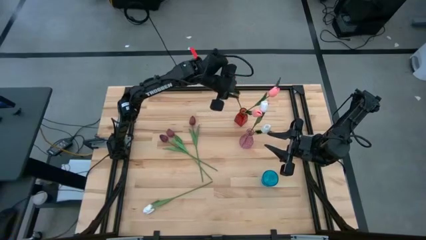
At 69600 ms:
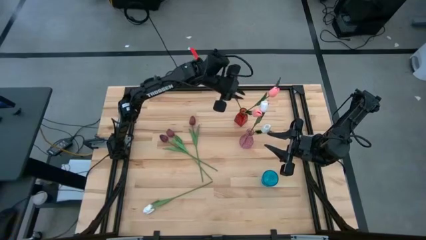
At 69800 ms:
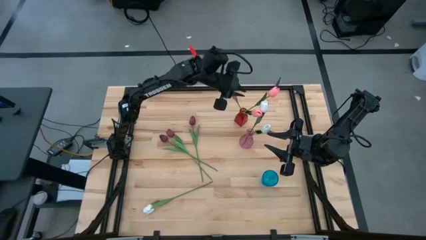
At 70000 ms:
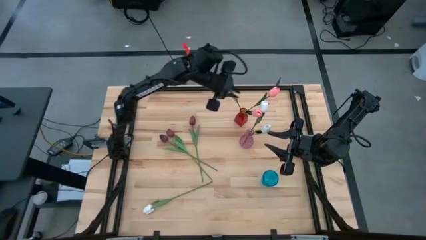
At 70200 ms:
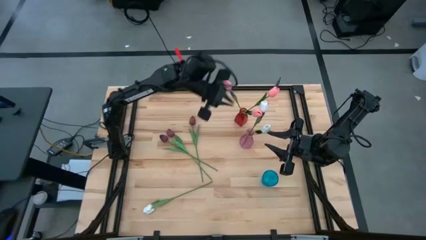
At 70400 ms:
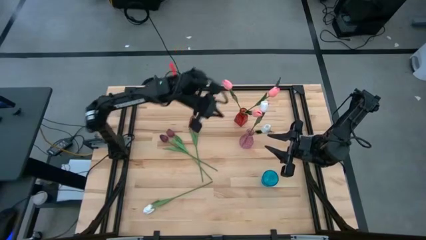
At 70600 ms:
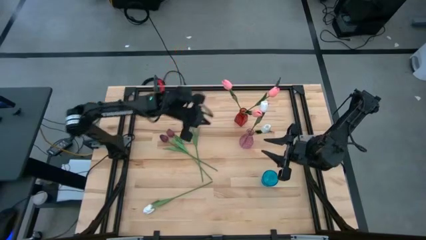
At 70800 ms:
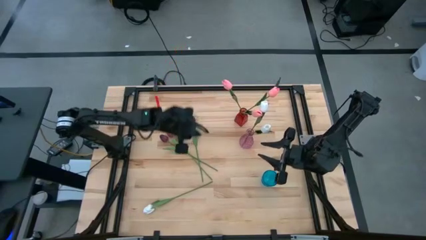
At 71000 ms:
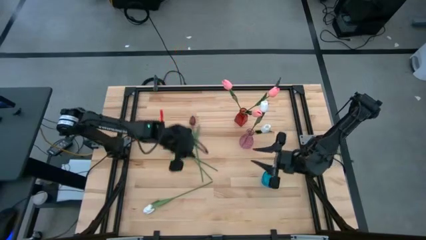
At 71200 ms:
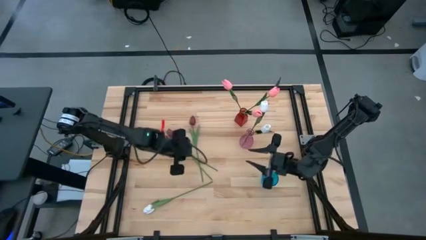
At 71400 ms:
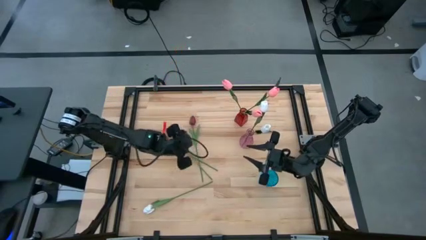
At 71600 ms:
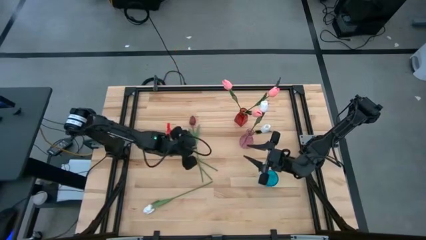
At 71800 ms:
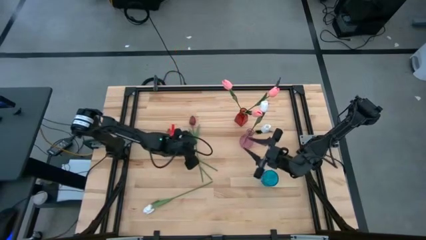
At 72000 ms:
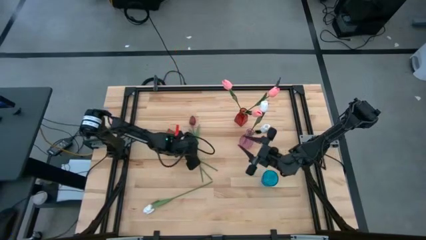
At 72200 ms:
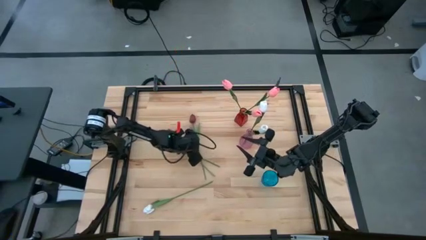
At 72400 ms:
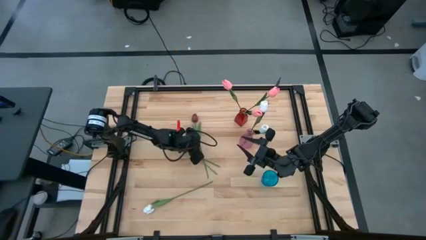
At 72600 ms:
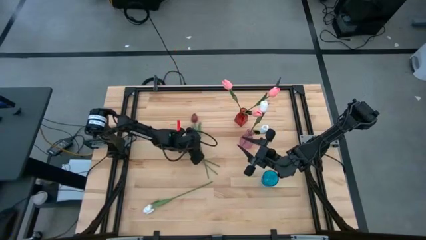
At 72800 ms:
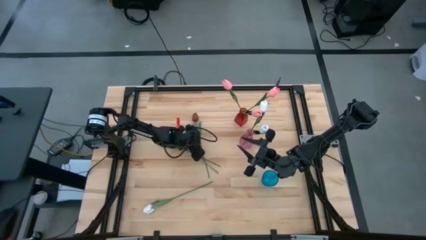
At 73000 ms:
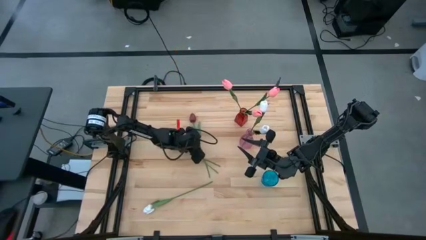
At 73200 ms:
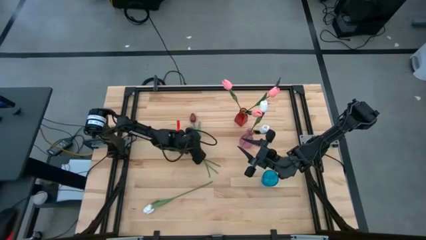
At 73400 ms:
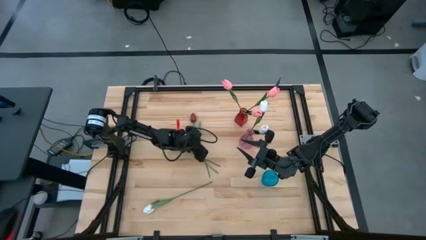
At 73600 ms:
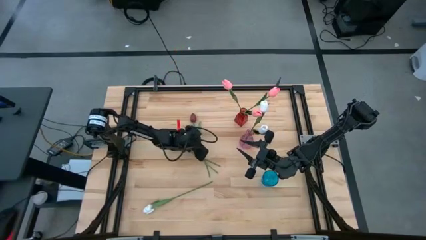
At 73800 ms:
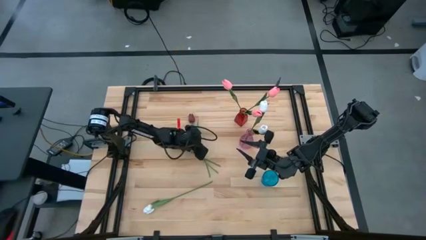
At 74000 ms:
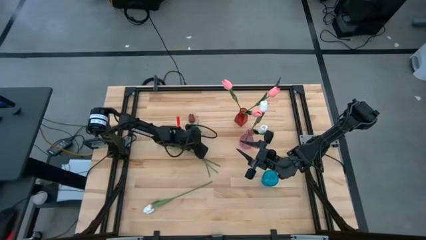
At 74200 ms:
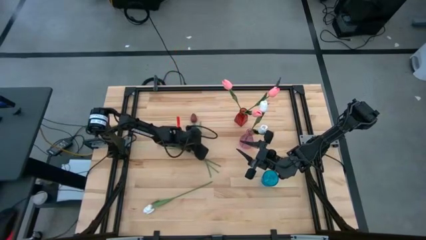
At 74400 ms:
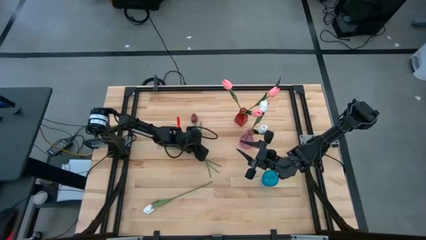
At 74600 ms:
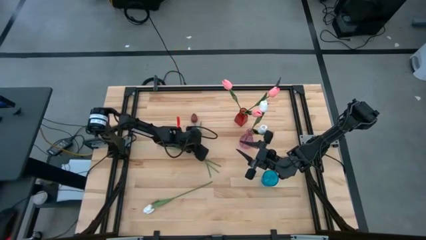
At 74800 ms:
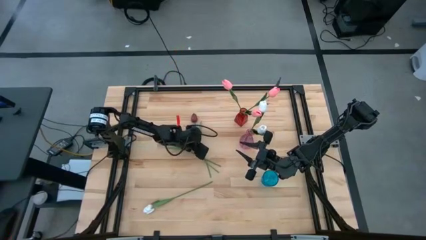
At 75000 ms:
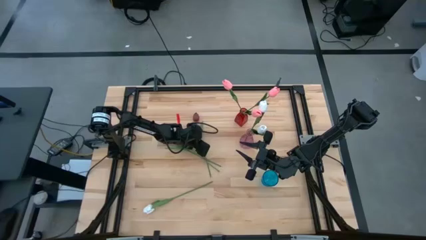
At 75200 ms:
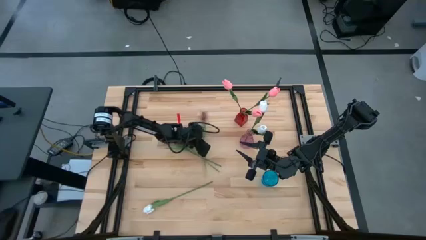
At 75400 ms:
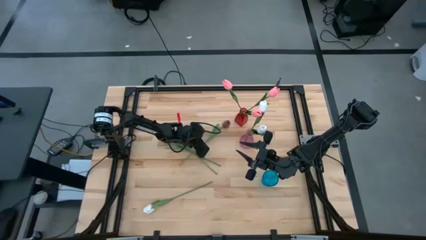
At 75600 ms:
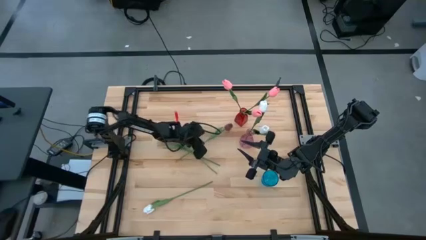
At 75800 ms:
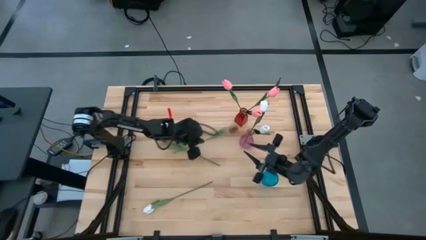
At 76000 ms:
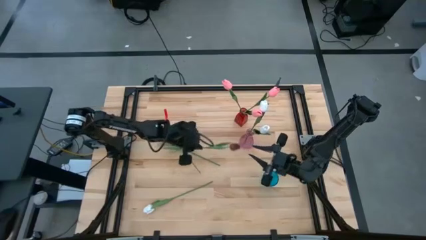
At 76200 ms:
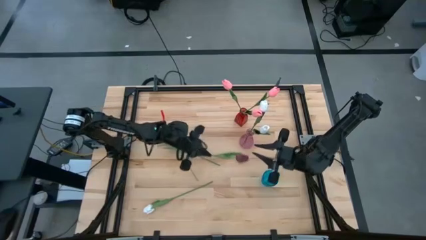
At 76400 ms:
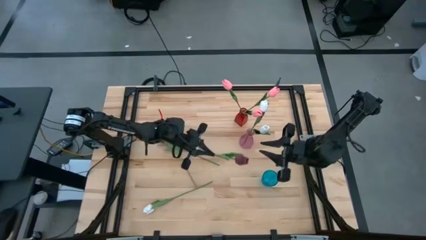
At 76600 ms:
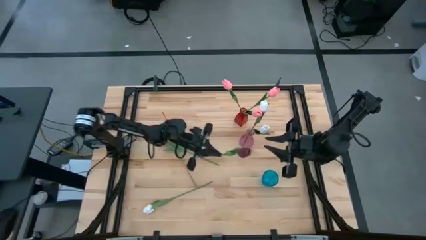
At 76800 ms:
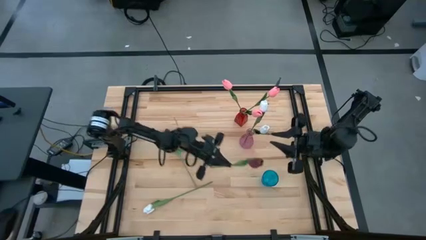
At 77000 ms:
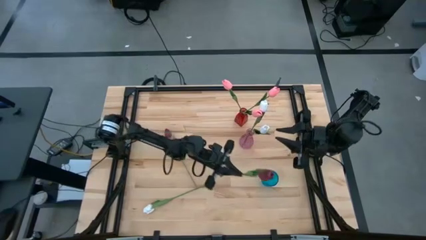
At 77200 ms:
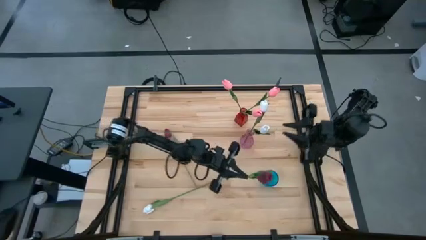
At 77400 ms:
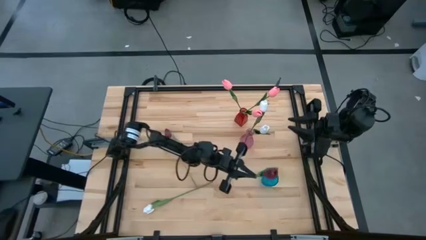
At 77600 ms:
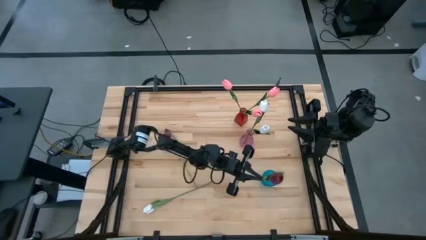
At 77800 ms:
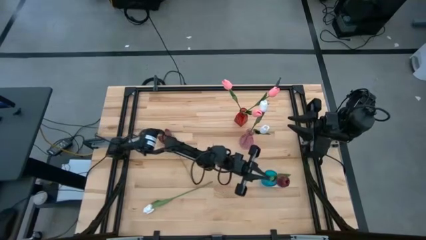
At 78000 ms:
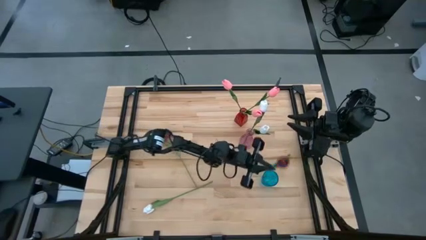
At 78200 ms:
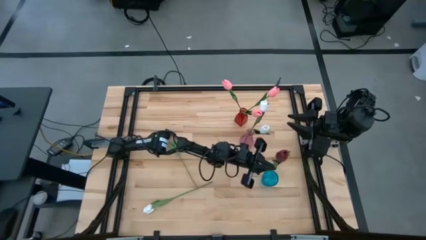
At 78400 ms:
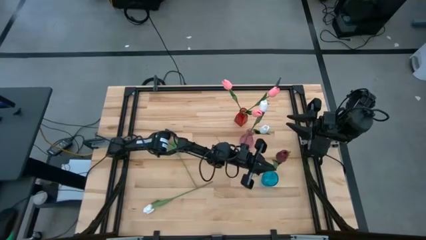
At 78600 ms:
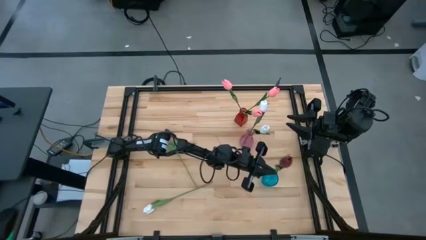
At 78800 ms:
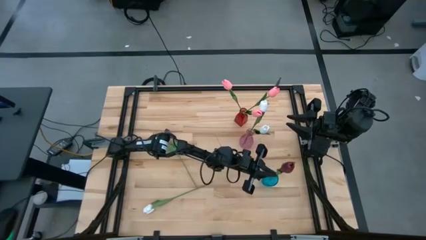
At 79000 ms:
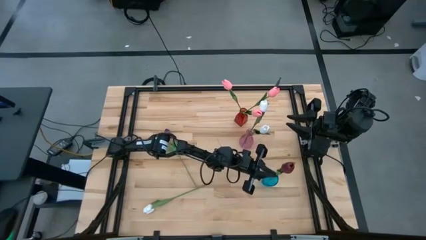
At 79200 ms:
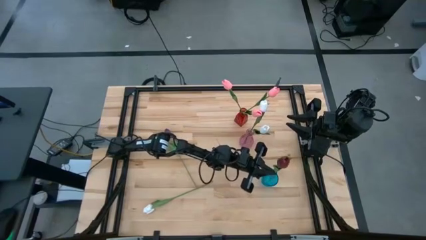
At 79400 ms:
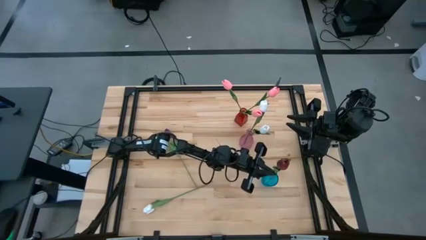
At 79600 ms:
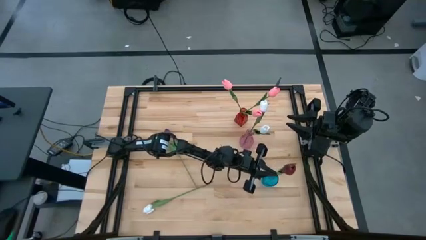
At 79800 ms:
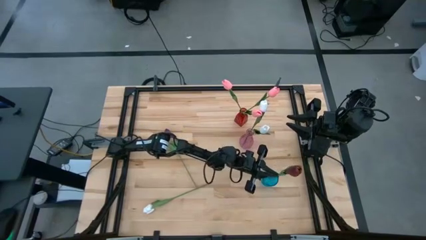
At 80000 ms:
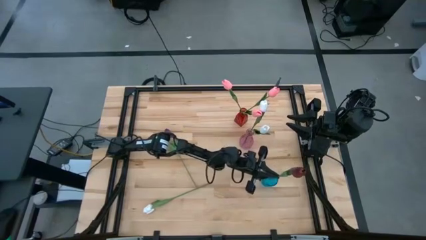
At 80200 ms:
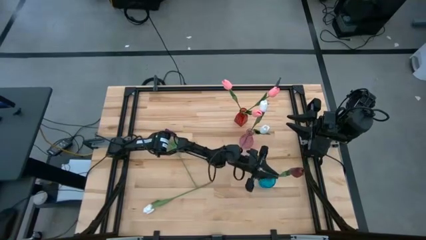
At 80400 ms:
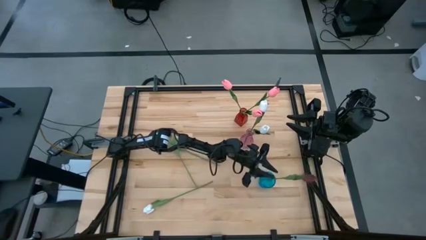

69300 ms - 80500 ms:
Task: Sort flowers into vase by color
Put the right red tulip into the blue vase

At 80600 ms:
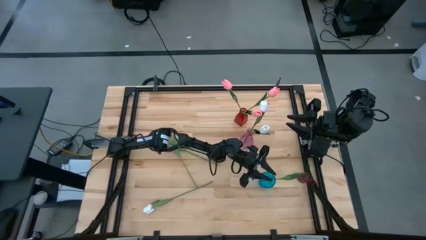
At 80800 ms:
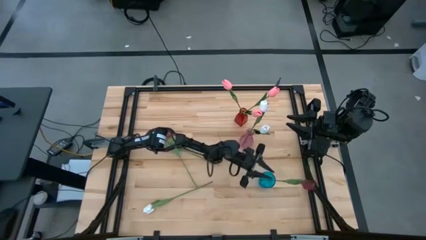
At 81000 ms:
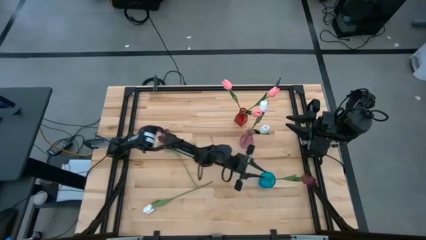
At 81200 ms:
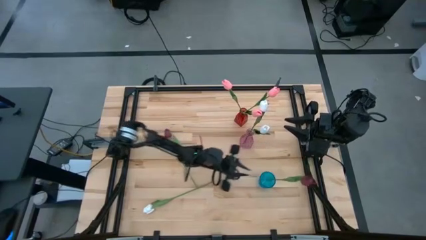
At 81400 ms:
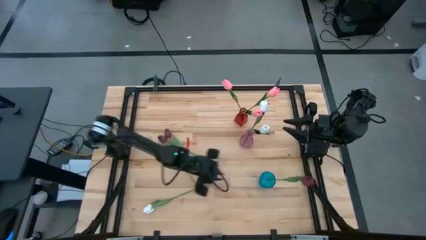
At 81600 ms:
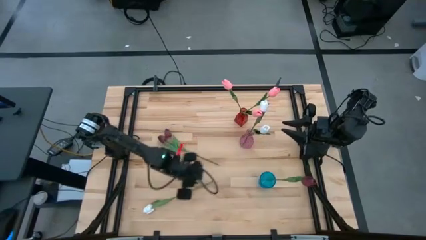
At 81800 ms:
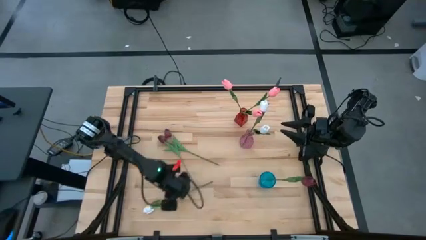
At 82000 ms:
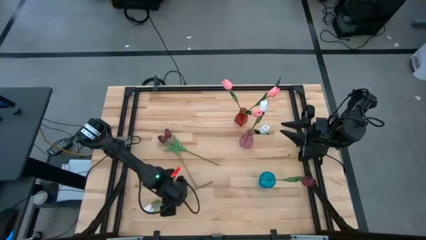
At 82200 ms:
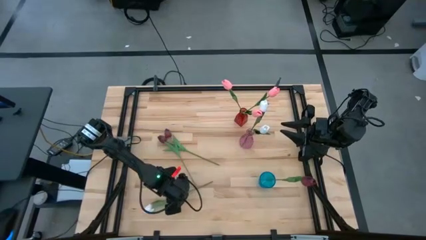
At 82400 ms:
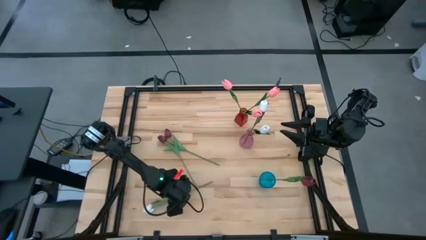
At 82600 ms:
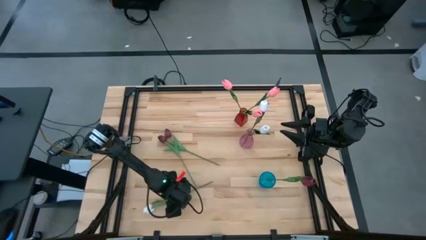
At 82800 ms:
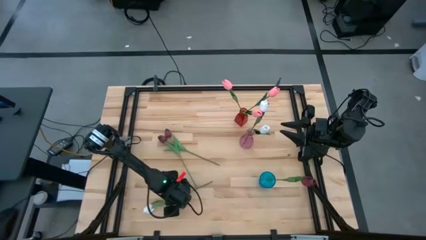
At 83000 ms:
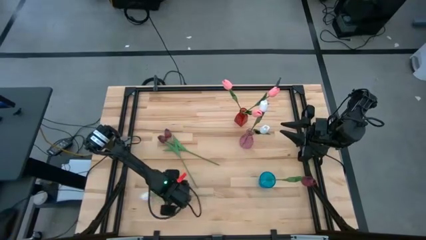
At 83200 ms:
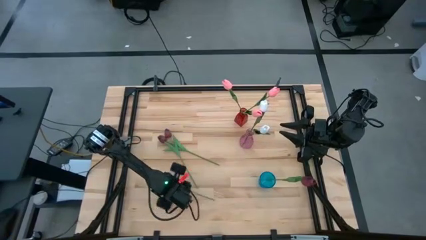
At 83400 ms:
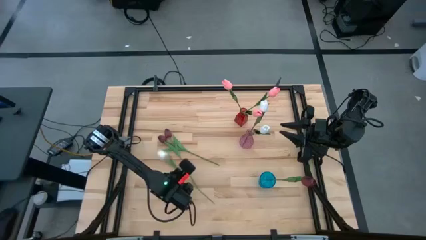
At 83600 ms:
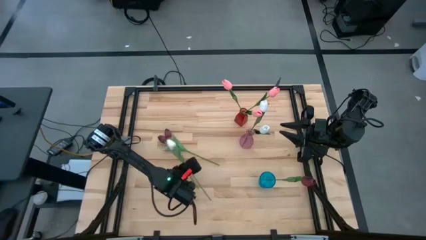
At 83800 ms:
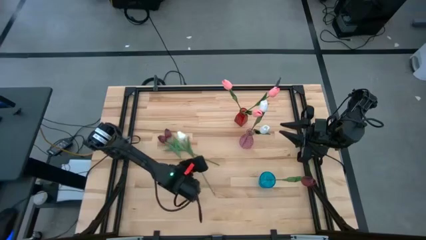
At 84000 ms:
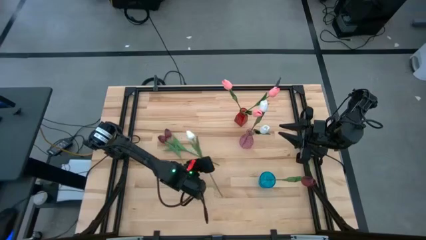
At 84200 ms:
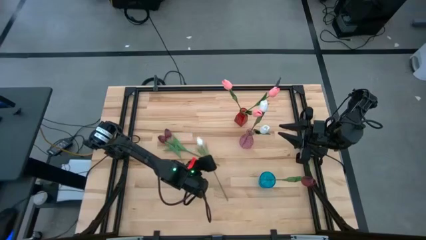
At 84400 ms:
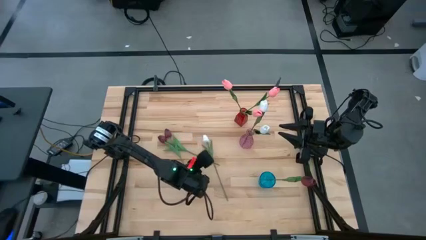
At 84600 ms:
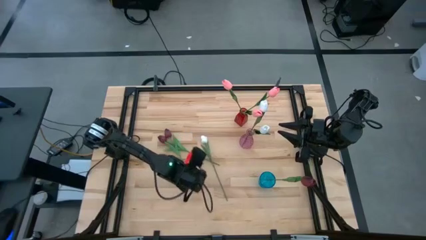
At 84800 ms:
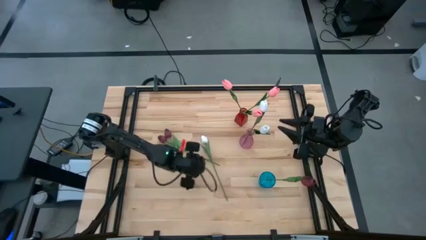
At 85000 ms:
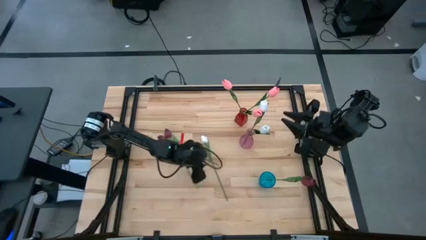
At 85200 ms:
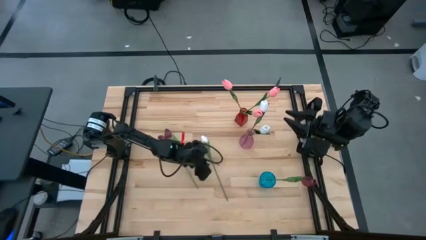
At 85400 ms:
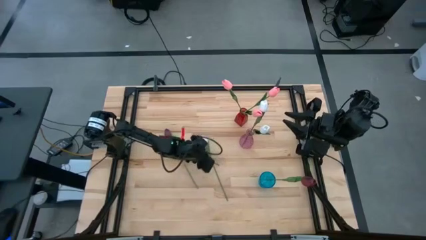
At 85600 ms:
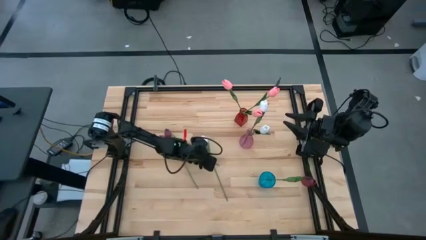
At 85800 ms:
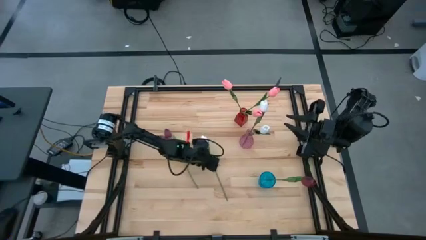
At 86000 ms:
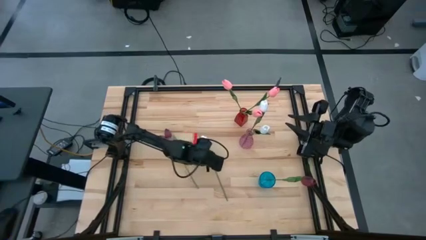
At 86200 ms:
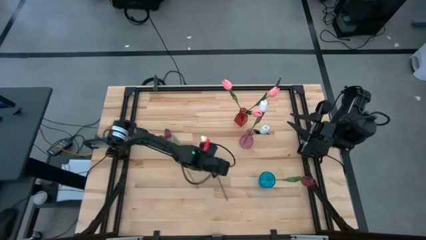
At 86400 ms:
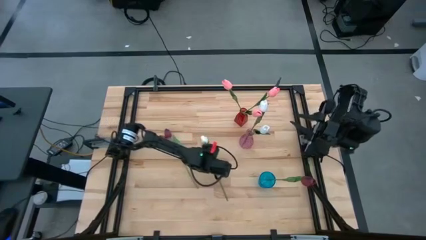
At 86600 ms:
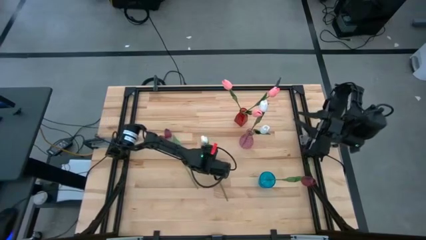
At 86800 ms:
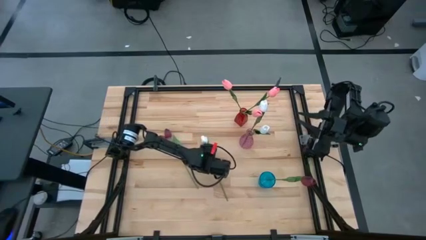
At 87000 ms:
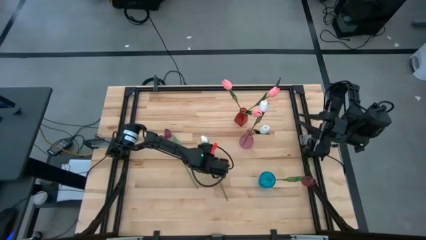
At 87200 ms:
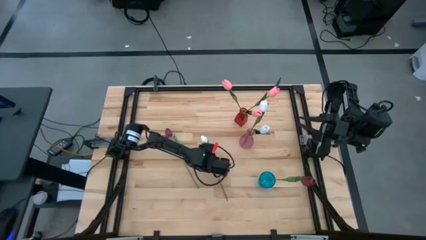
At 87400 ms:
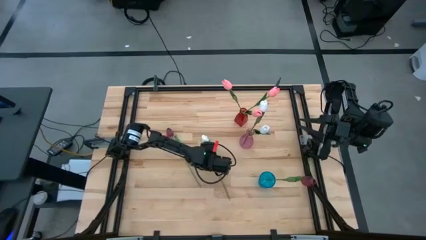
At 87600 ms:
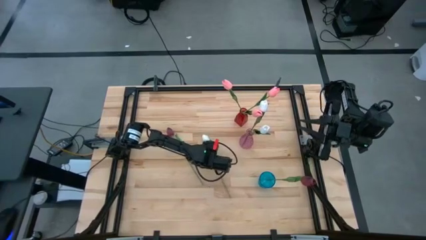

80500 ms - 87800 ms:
Put the white tulip into the pink vase
